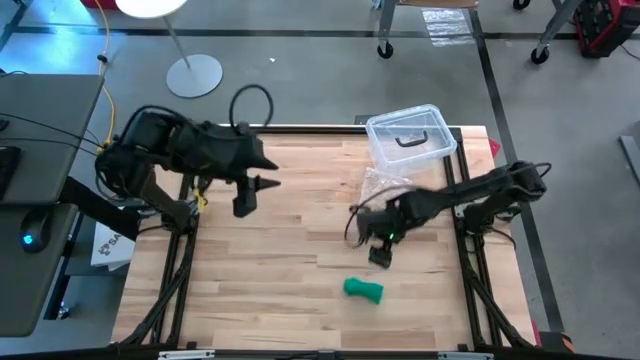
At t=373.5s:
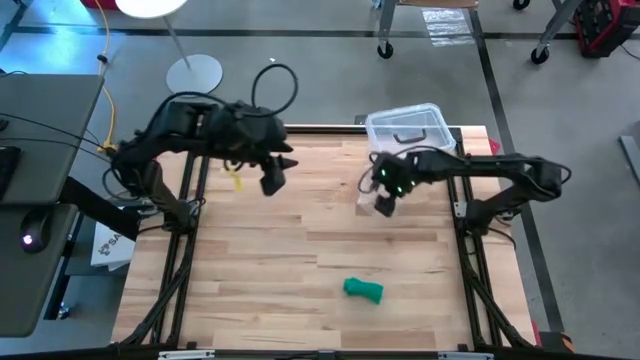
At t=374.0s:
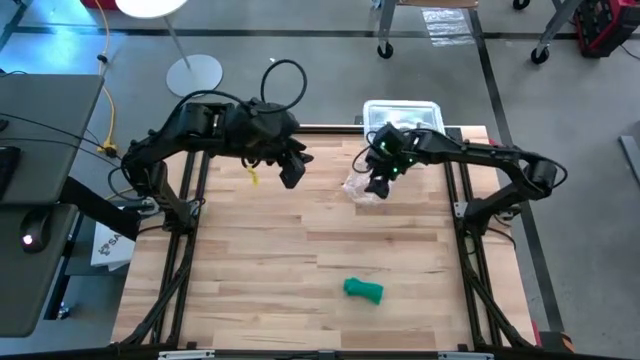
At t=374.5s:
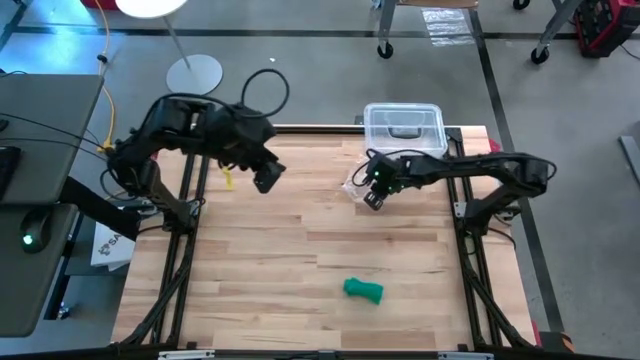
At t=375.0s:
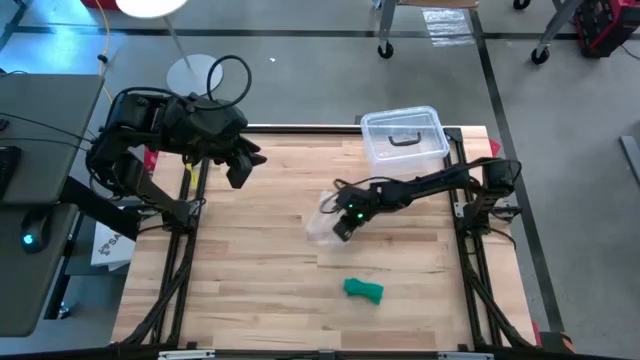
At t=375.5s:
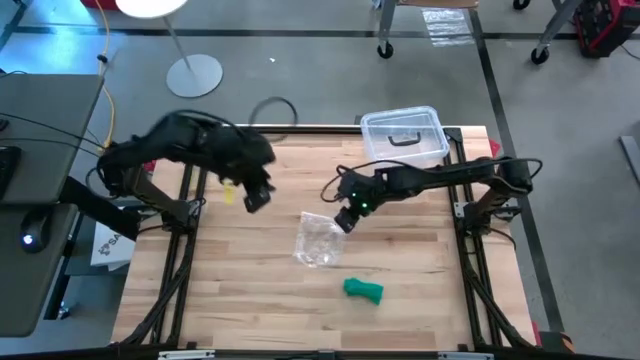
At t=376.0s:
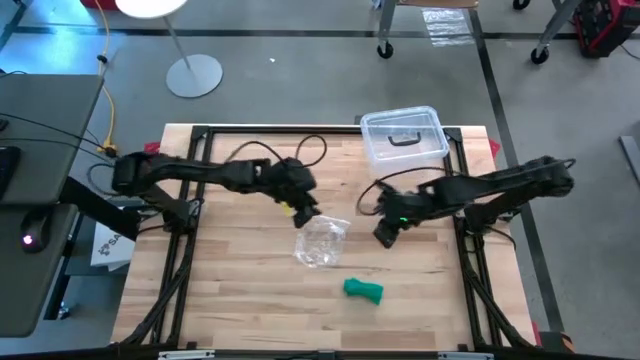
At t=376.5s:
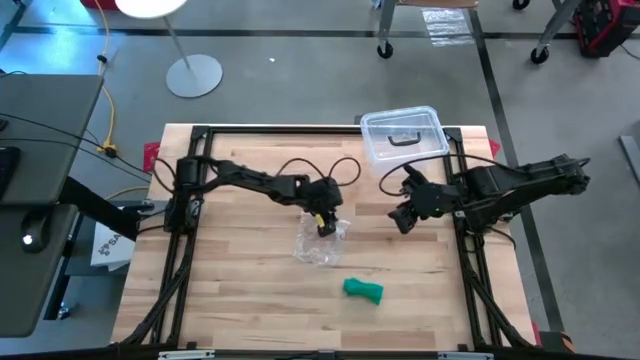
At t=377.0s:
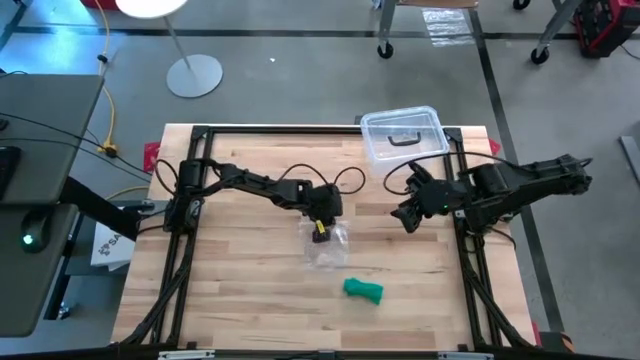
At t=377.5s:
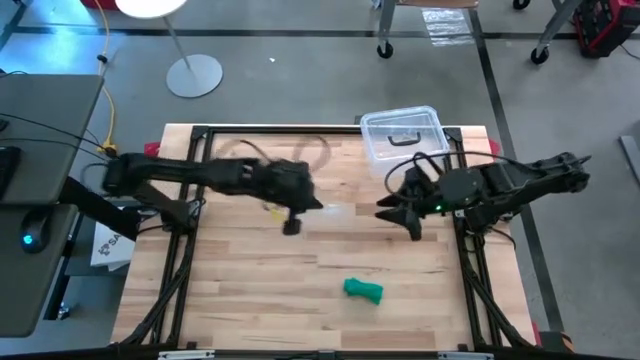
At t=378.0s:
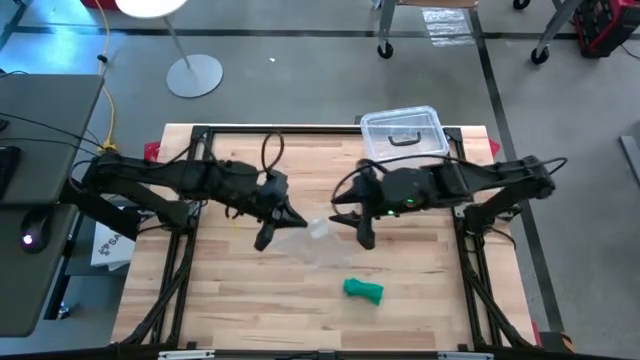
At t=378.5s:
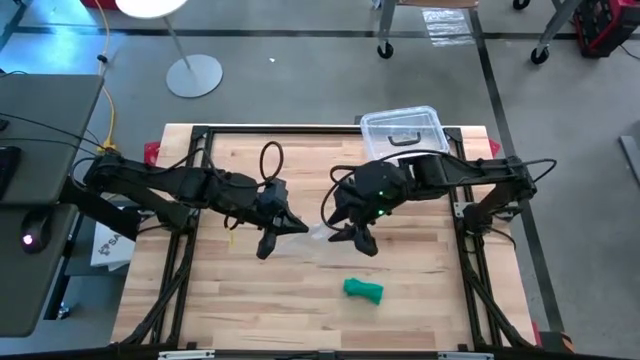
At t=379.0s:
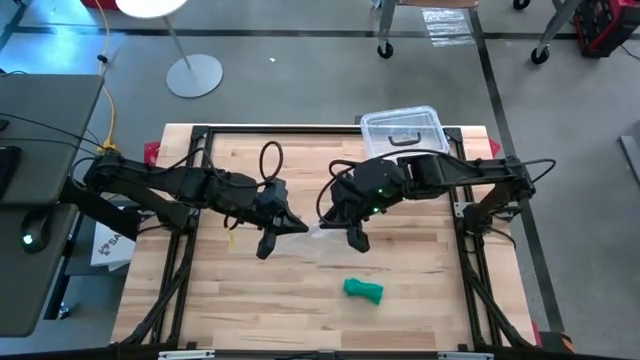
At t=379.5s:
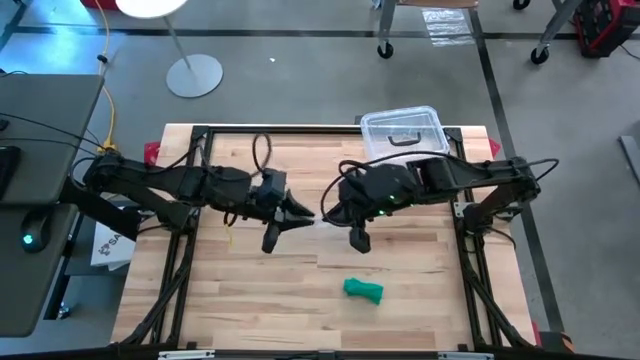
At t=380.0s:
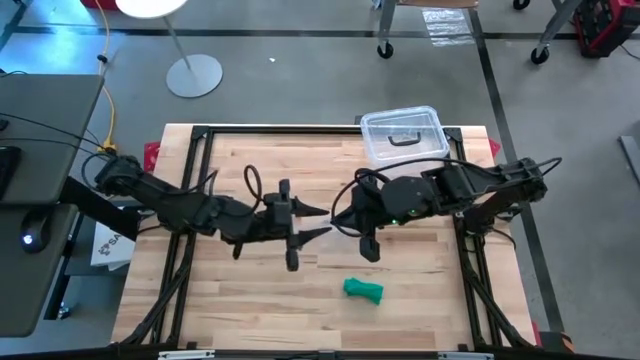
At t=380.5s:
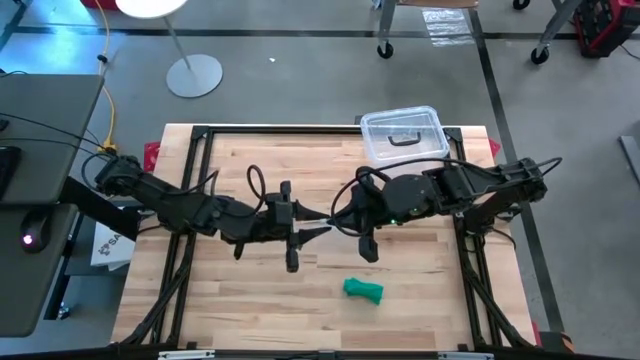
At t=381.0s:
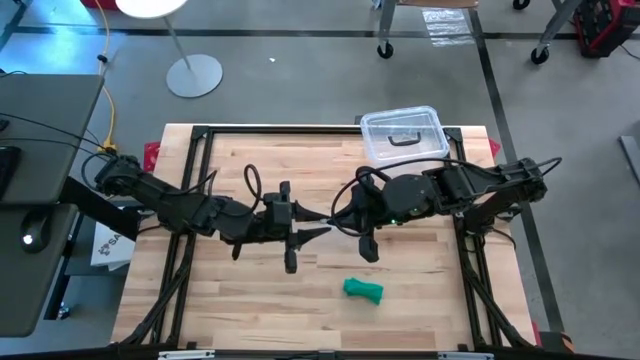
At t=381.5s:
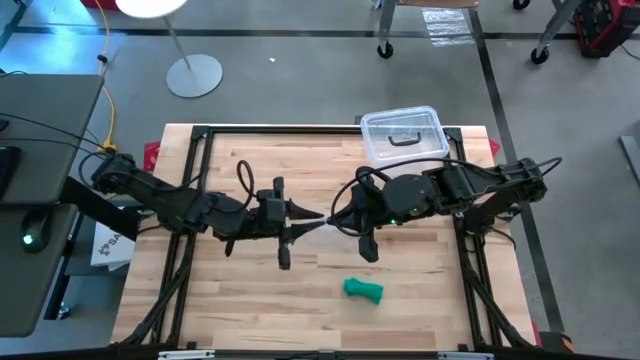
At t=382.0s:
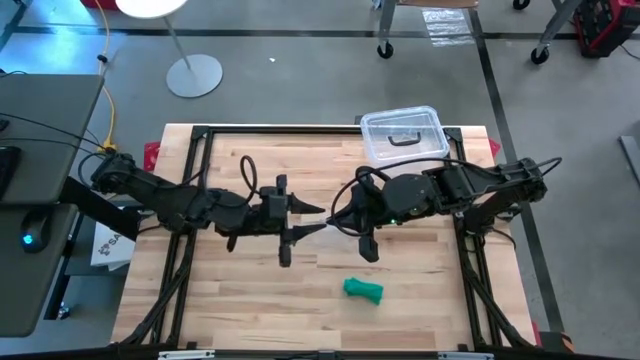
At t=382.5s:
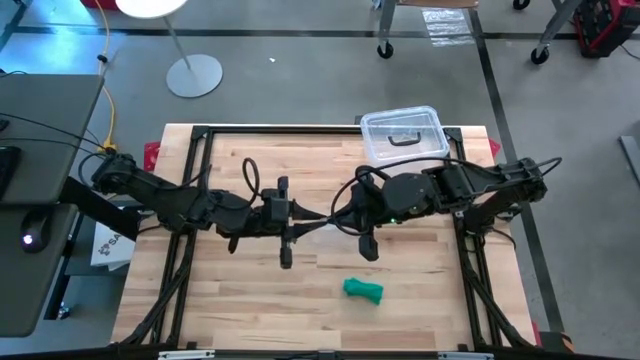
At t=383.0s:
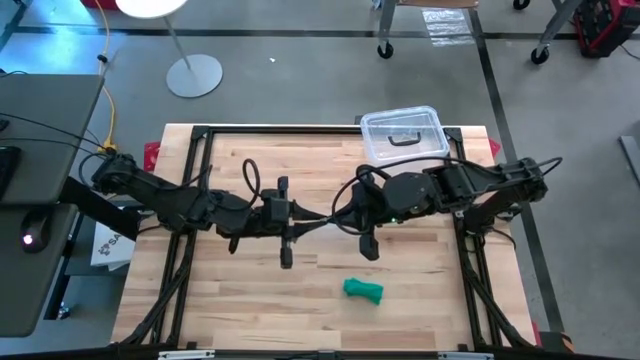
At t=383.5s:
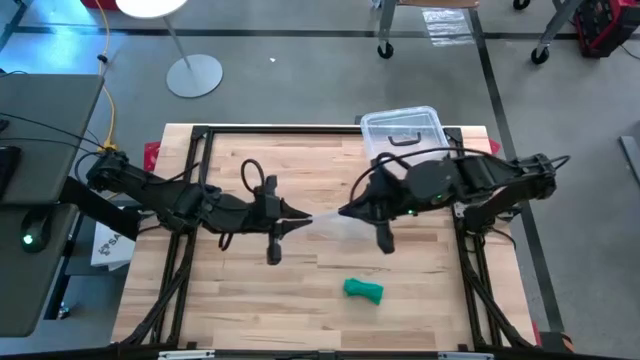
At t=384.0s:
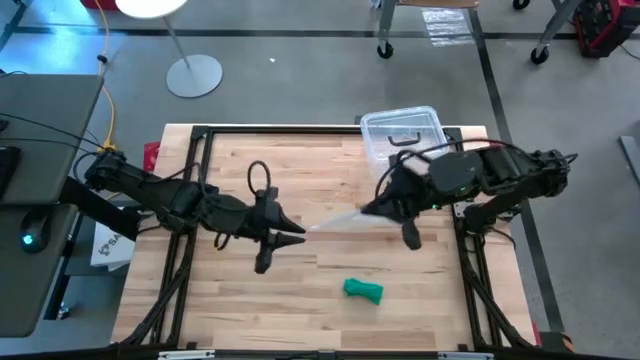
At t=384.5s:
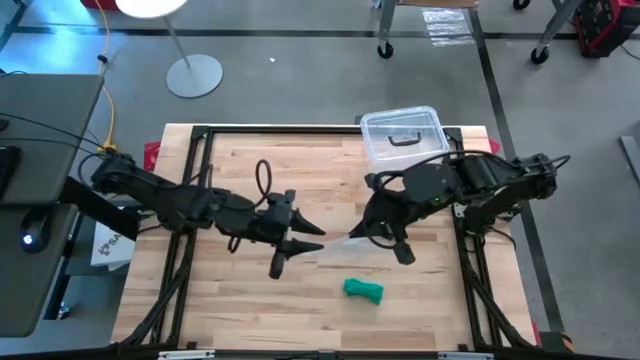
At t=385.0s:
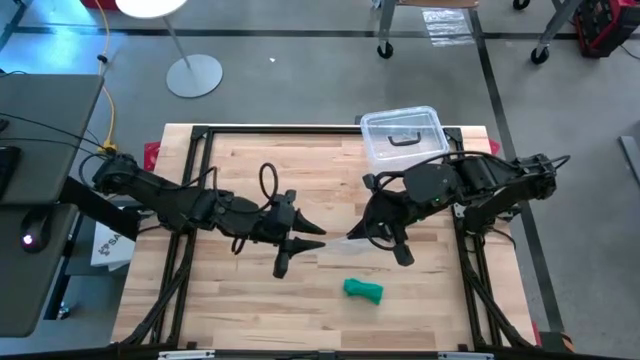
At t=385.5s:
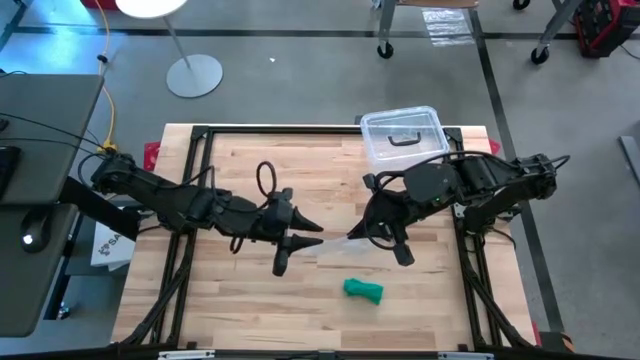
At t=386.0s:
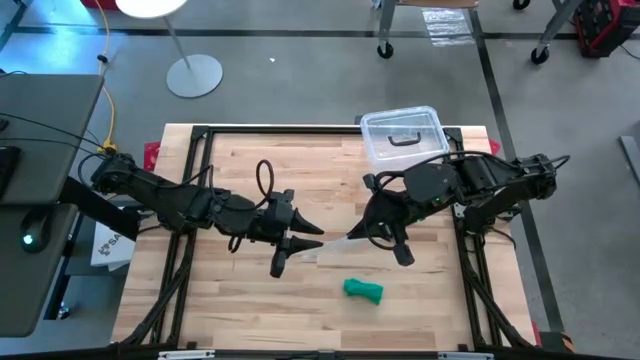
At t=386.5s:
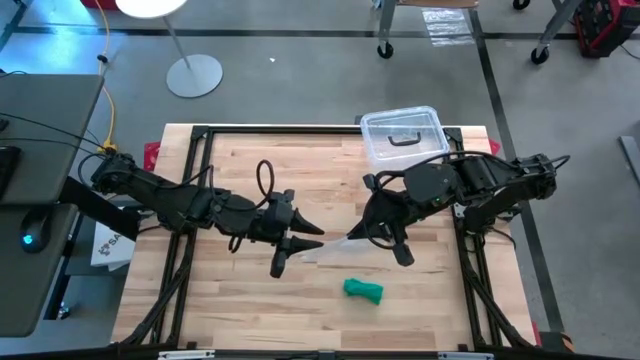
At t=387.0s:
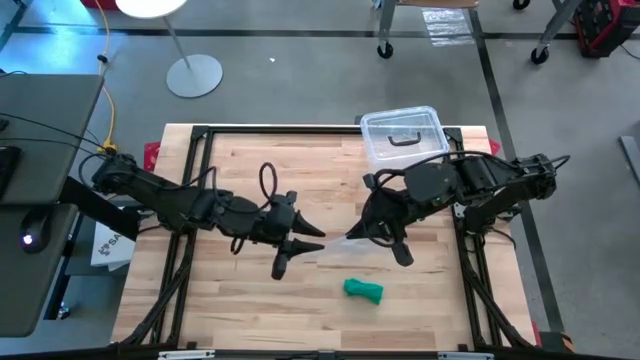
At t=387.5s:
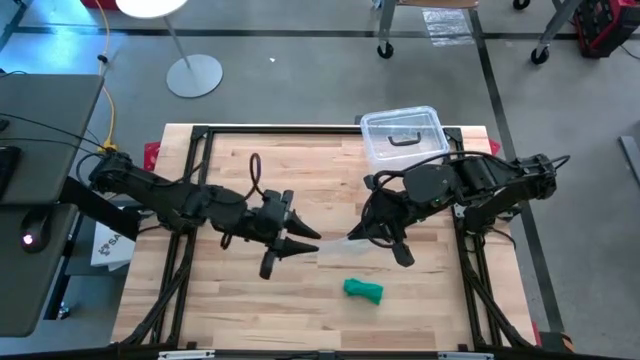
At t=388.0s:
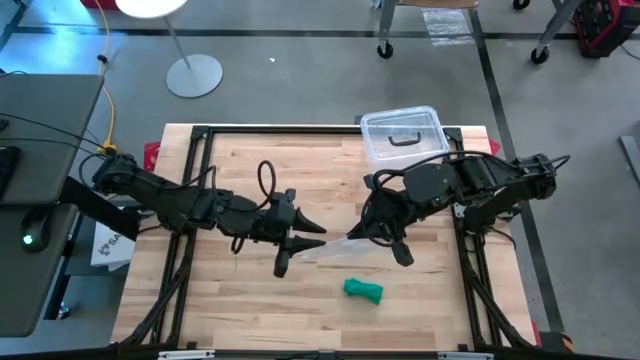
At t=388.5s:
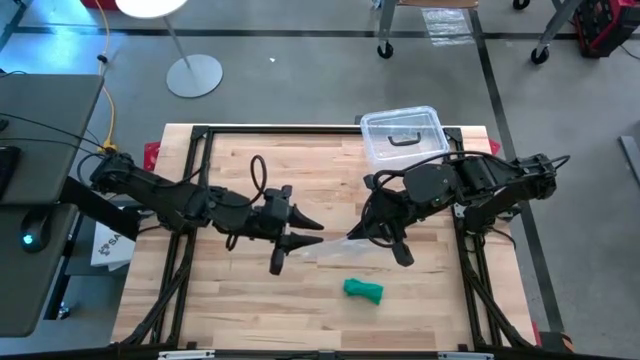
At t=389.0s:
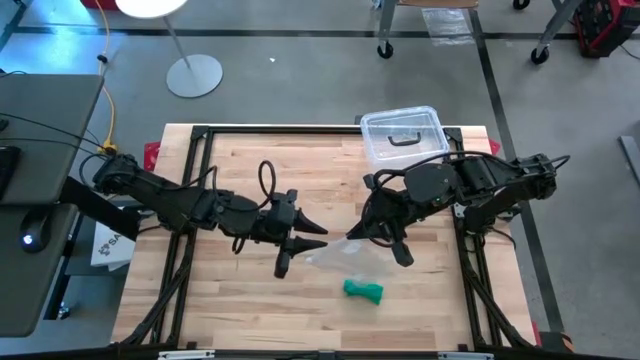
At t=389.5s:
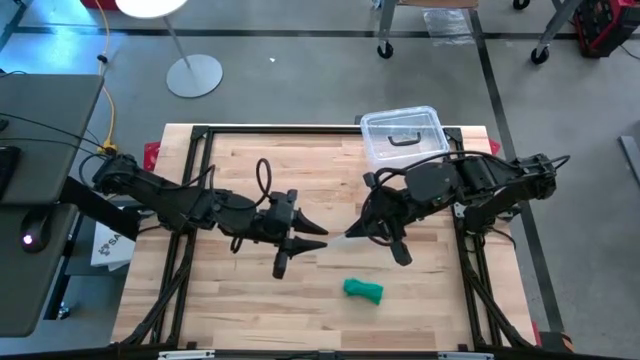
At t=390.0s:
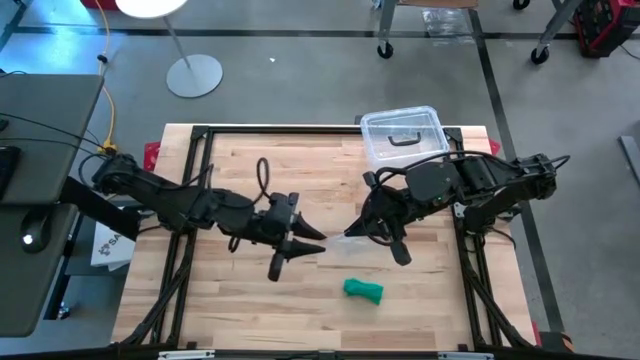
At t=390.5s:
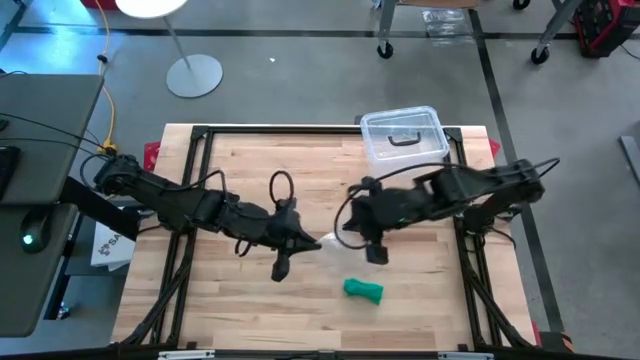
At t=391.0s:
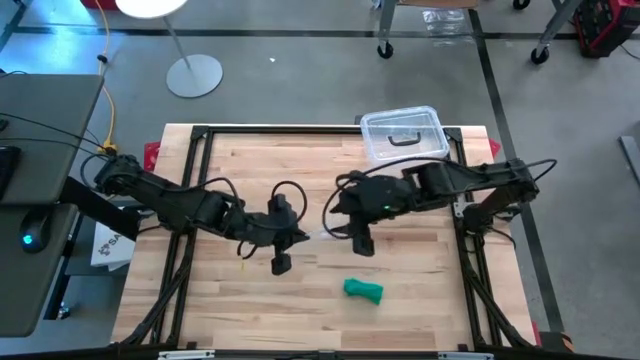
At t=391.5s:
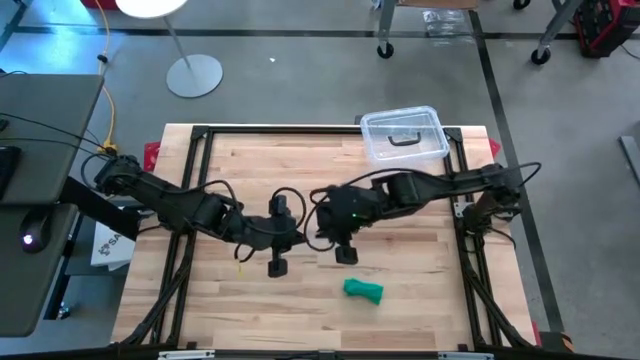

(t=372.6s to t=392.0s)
Task: Roll bandage
Open the transparent zip bag

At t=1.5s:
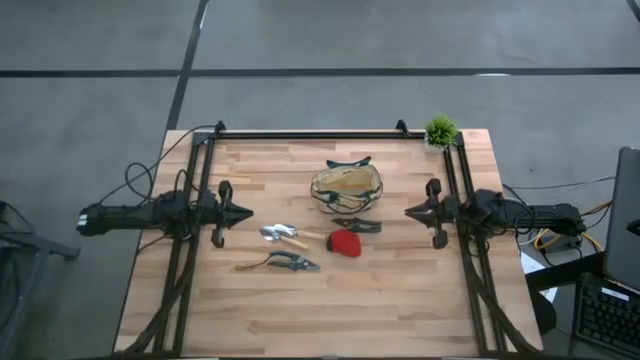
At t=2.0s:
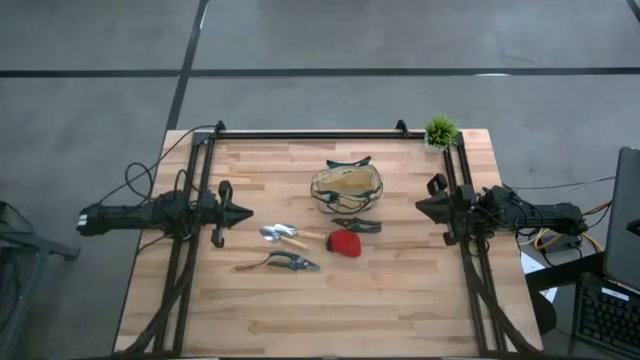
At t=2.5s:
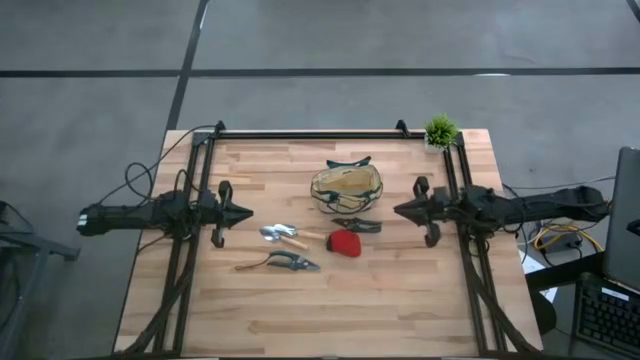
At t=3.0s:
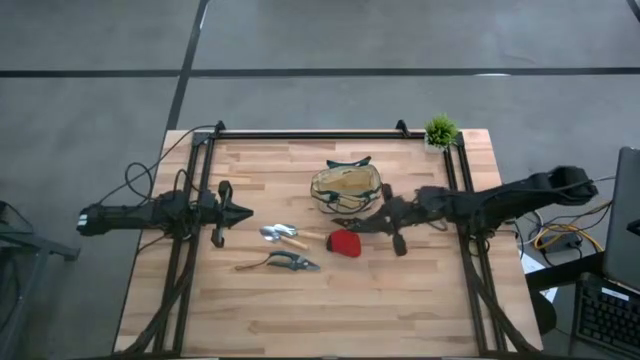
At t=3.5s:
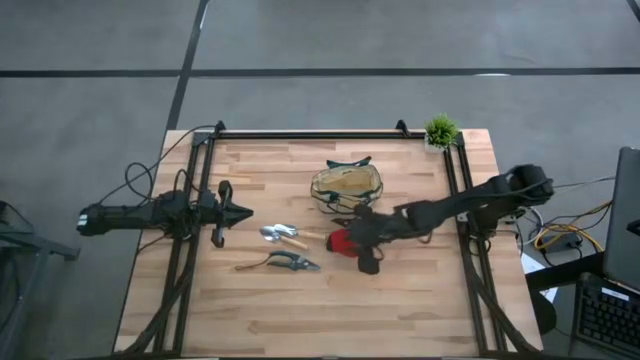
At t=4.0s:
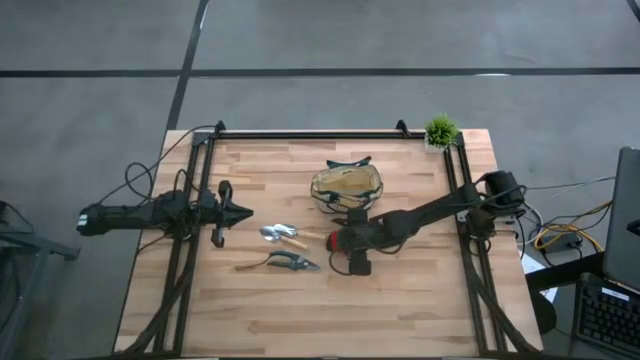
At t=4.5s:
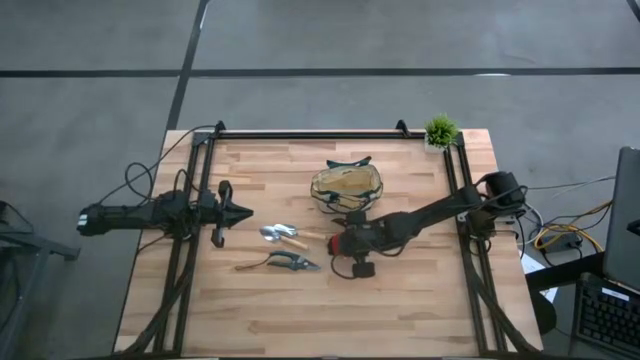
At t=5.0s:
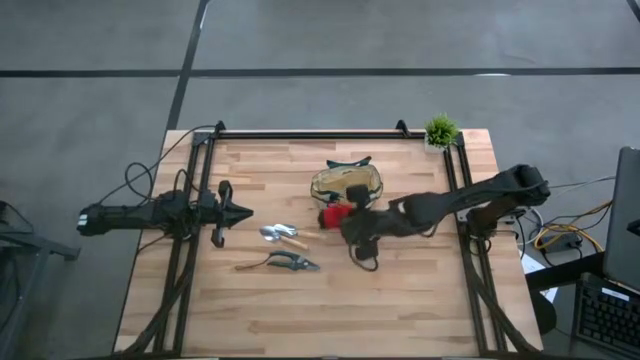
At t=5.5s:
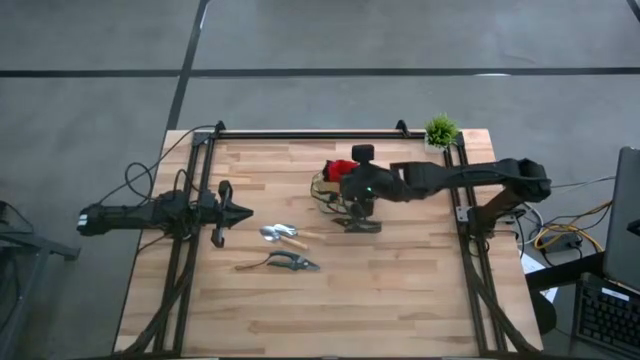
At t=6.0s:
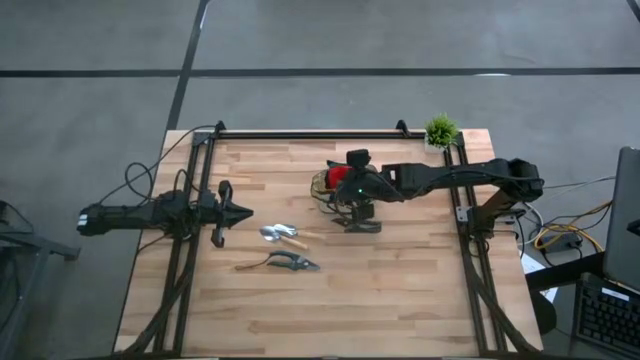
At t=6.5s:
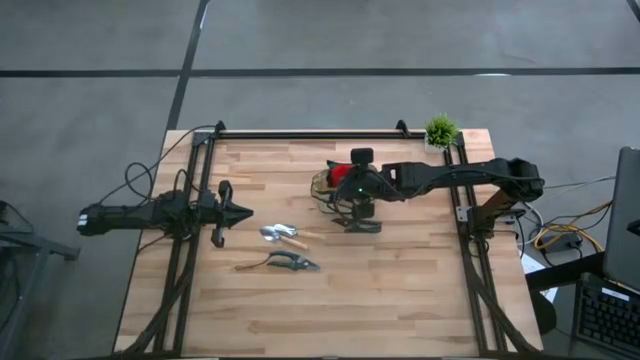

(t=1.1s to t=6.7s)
Task: Pick & Place Garden tools in Gardening bag
Put the red gloves into the brown bag
